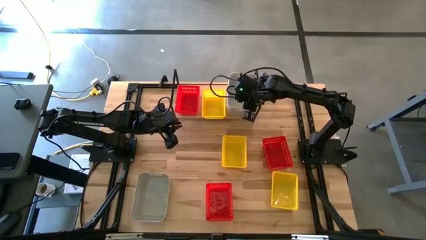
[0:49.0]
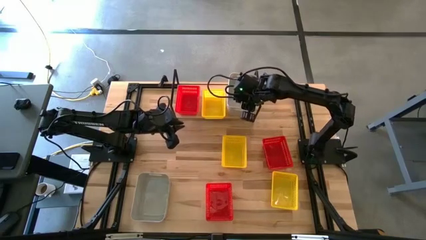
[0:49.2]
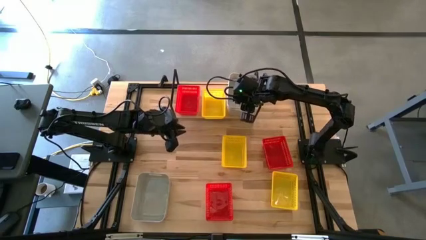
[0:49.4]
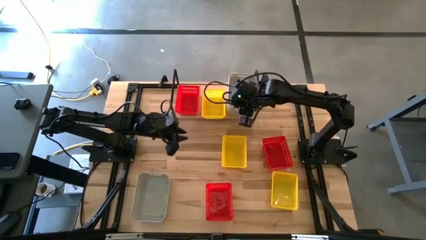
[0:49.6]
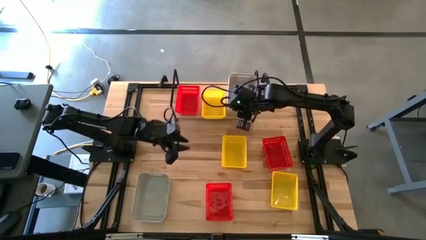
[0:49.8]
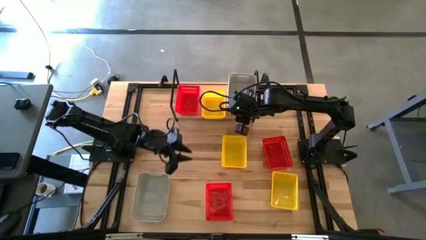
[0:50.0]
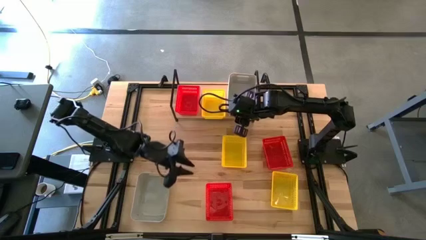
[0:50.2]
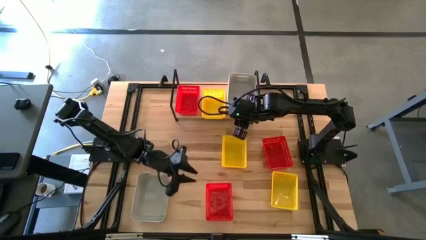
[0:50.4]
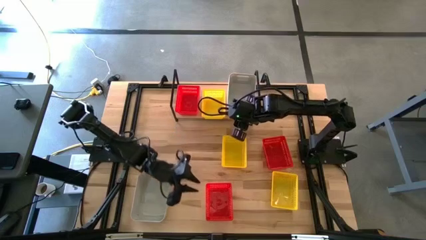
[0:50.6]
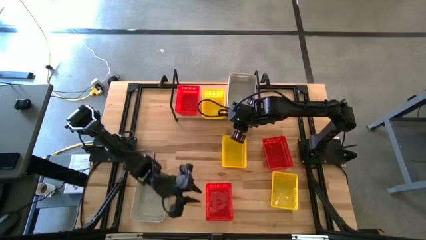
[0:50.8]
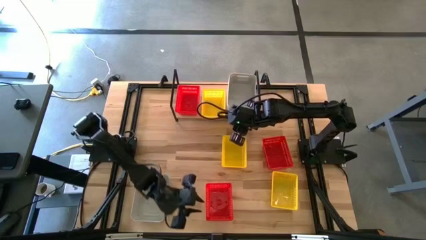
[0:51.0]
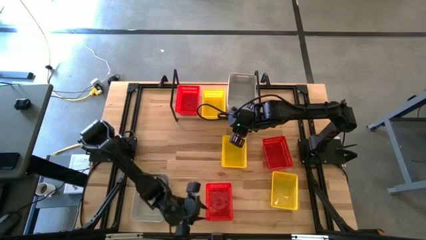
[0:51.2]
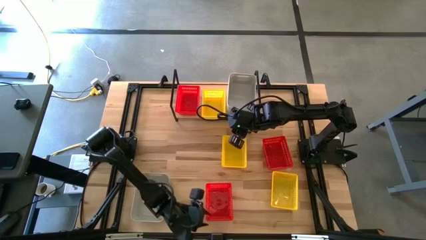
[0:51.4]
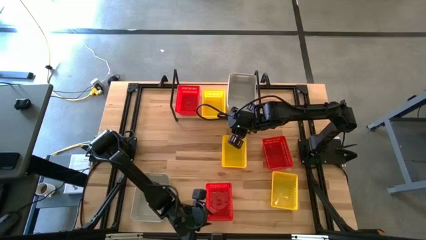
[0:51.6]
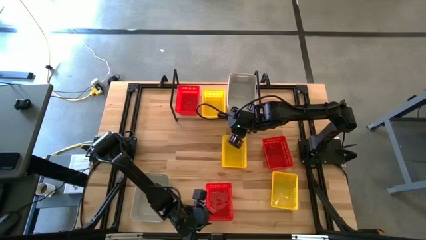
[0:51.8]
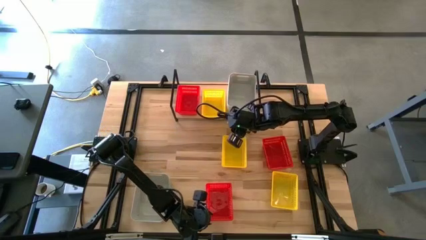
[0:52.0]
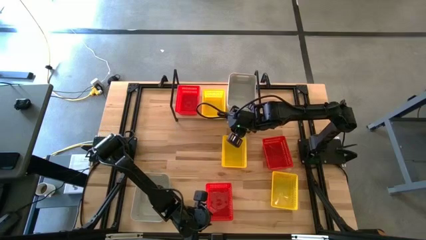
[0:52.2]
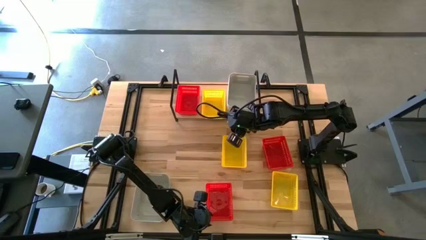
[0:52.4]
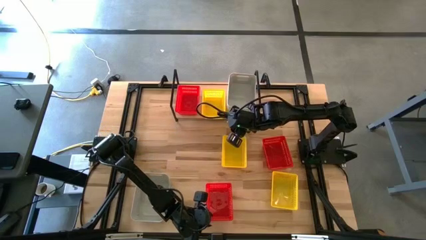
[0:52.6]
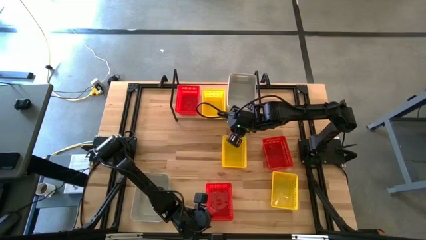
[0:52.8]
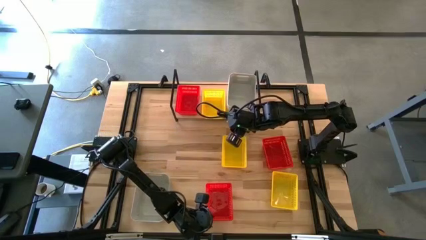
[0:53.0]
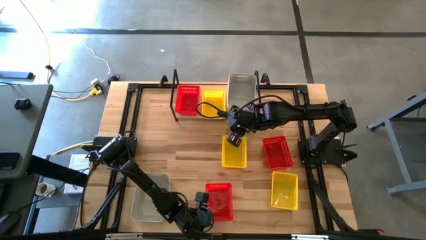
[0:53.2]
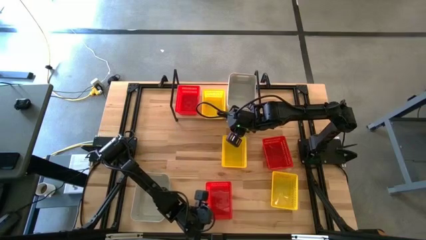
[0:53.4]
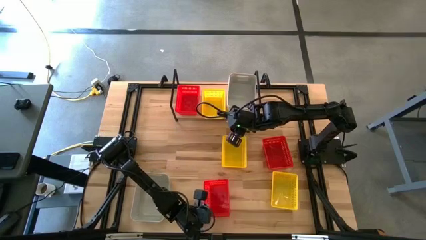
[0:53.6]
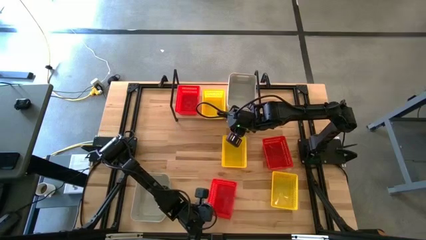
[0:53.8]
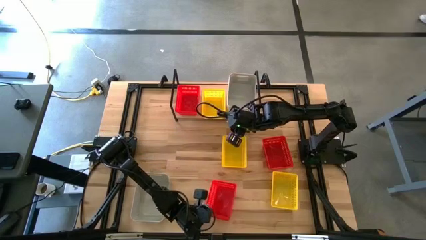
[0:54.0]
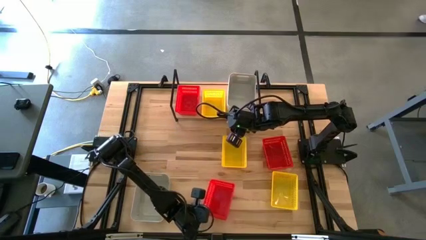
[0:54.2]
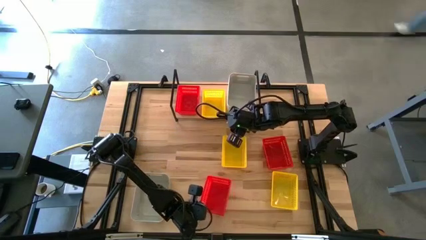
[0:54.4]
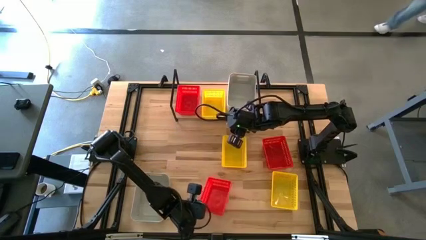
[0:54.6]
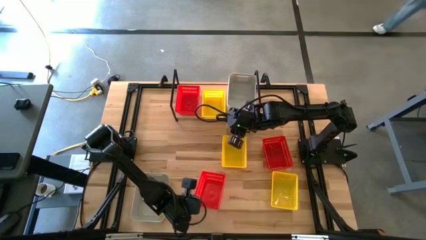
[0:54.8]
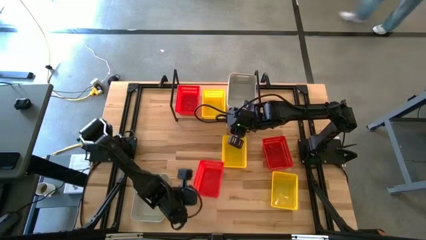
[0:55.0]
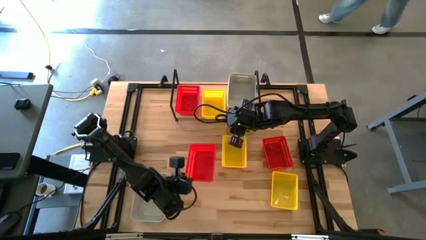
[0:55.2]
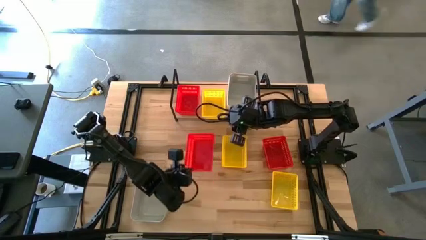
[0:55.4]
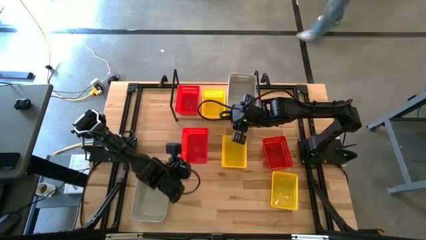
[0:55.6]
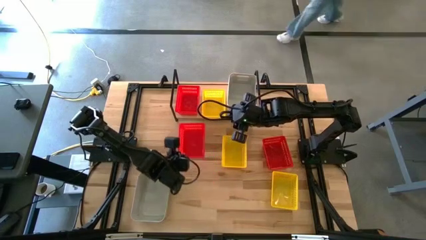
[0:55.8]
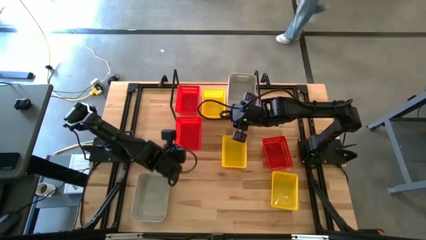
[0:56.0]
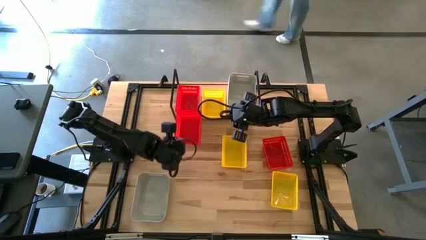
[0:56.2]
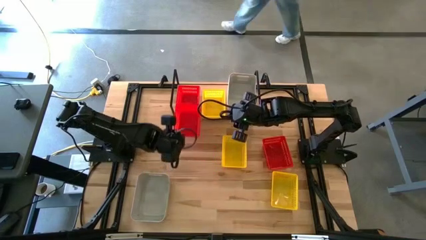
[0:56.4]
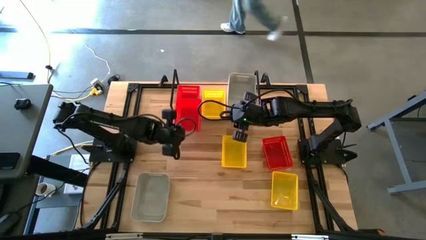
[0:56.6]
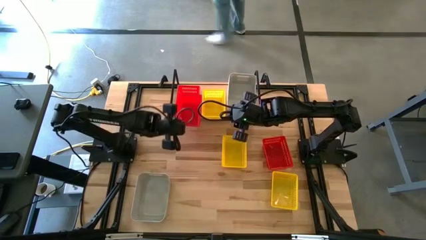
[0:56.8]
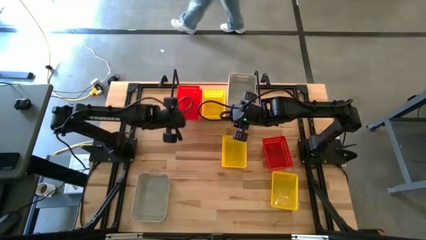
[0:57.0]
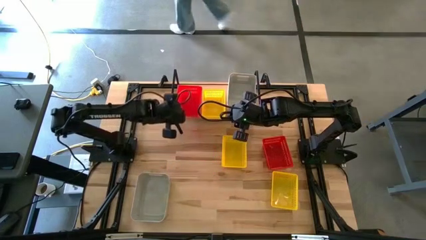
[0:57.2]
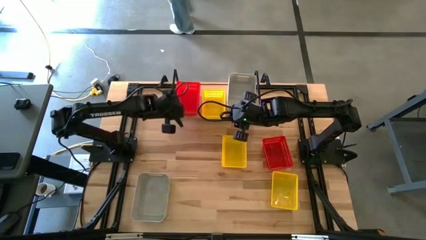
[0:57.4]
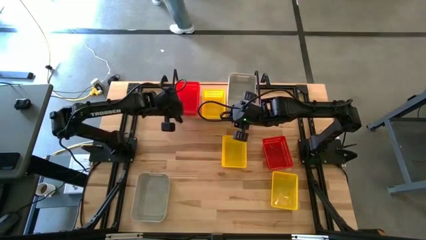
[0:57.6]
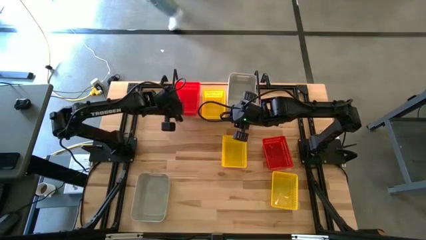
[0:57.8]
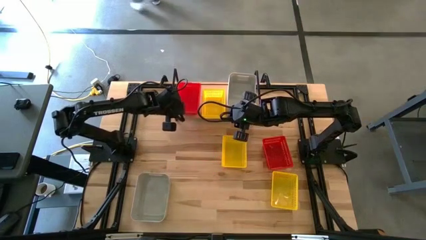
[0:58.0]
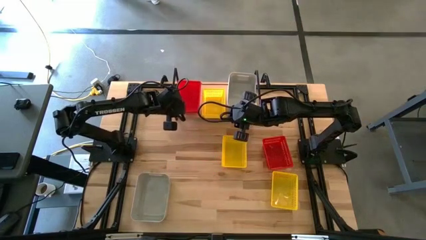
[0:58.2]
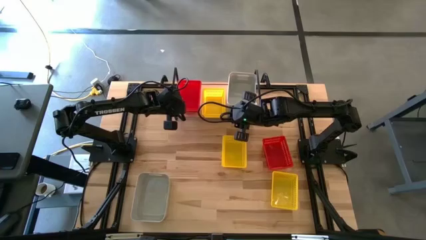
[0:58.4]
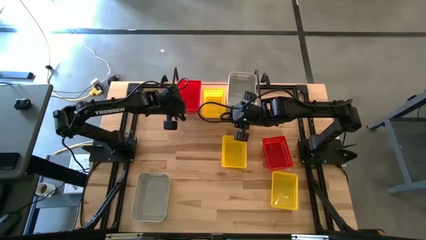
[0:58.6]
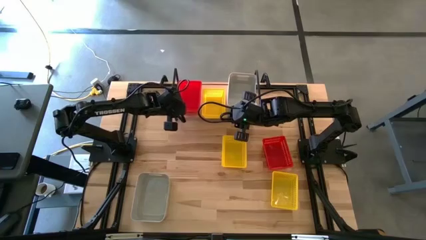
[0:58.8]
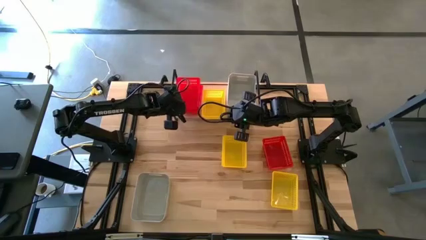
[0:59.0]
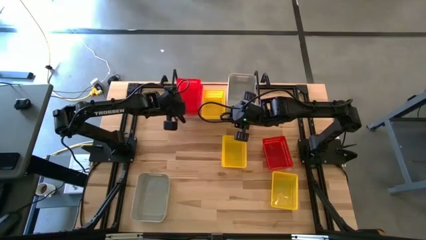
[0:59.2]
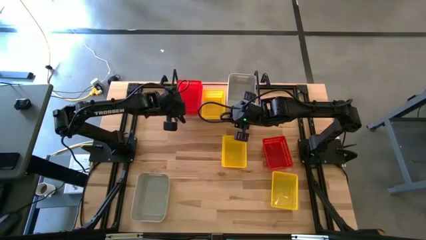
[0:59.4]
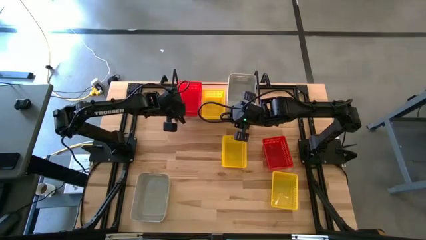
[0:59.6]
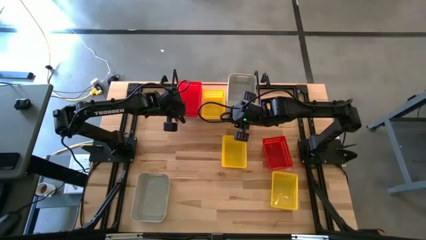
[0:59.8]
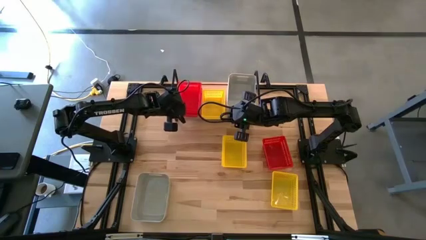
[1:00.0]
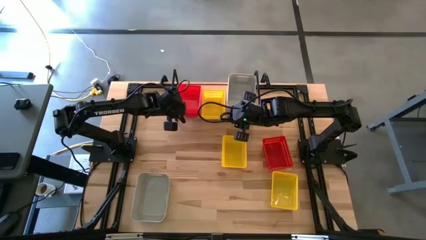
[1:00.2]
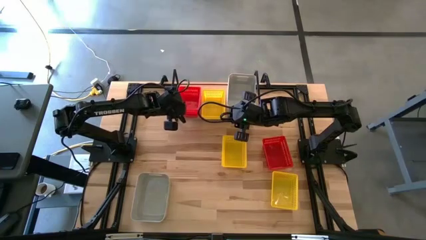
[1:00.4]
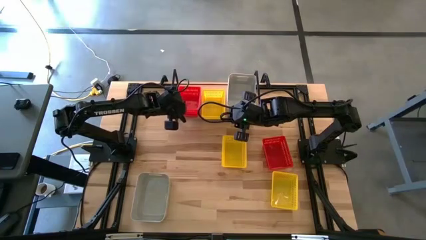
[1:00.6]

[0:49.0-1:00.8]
Task: Stack baskets on shelf by color
Stack the bottom red bin on the red bin on the shelf

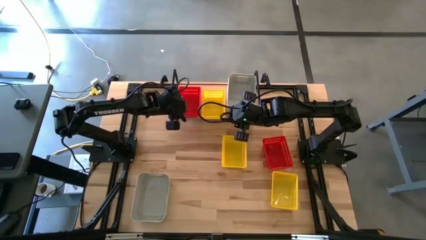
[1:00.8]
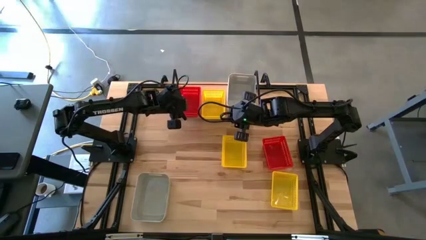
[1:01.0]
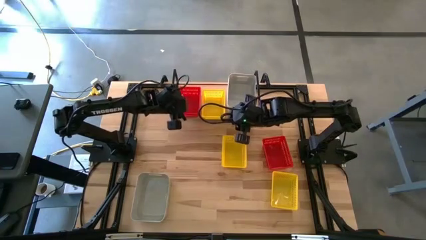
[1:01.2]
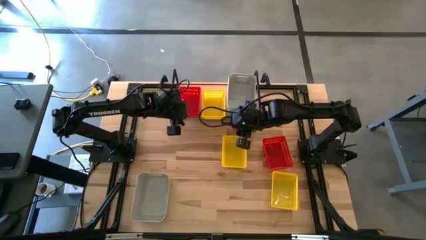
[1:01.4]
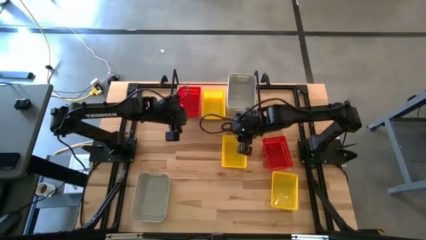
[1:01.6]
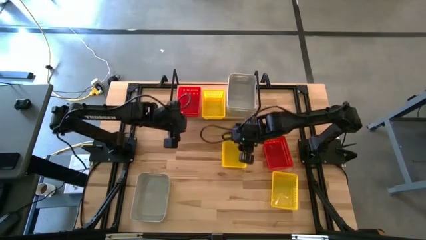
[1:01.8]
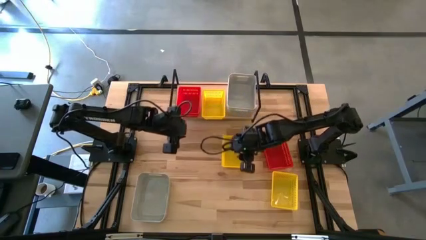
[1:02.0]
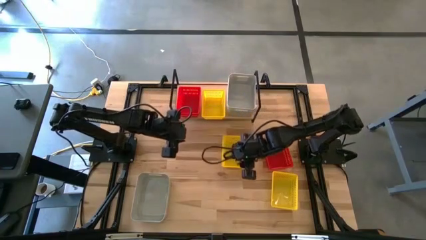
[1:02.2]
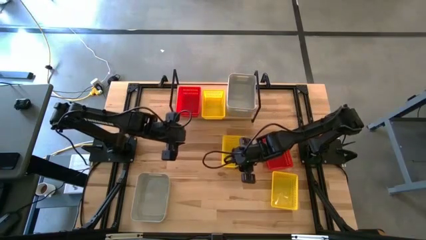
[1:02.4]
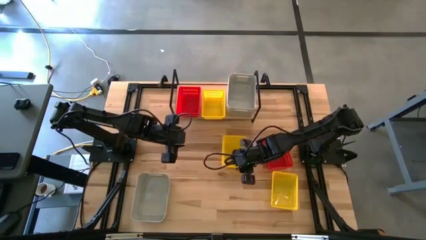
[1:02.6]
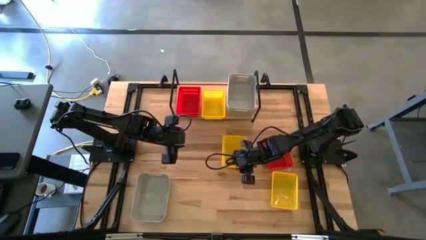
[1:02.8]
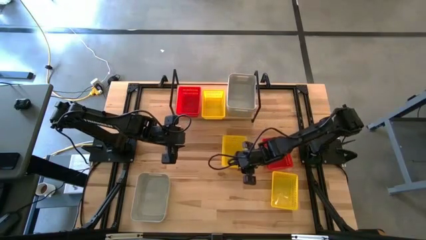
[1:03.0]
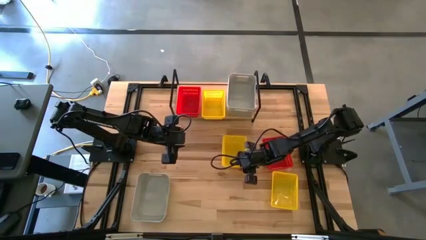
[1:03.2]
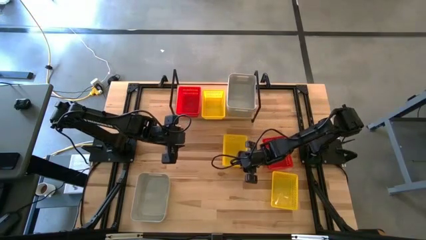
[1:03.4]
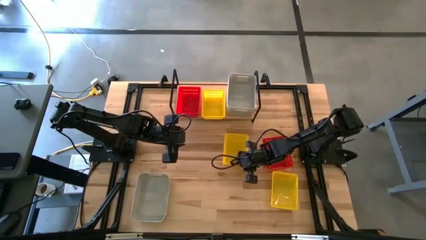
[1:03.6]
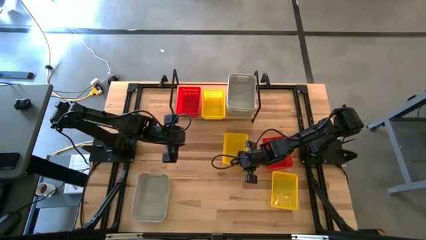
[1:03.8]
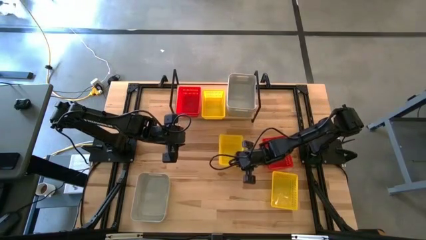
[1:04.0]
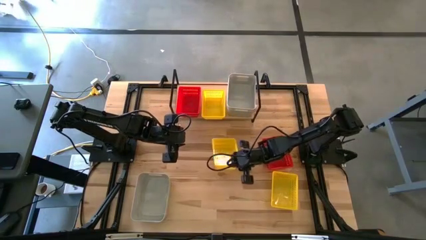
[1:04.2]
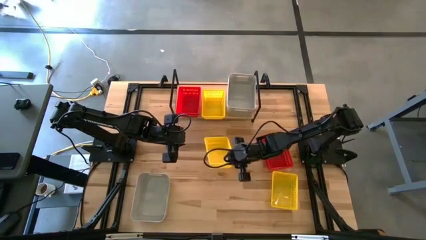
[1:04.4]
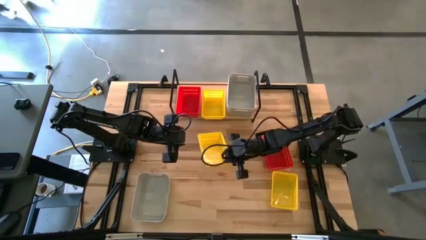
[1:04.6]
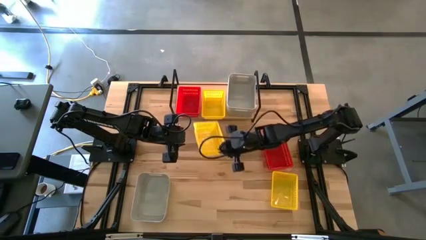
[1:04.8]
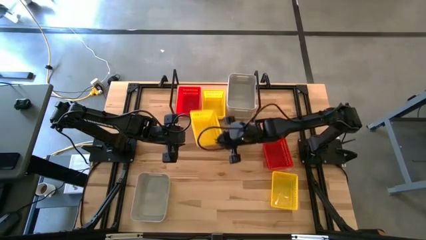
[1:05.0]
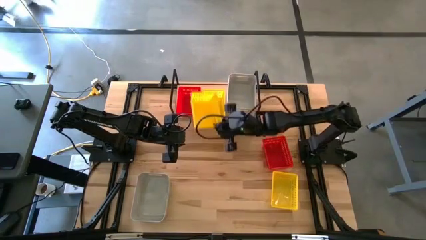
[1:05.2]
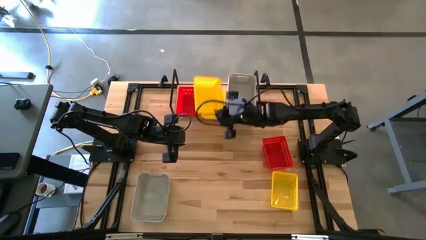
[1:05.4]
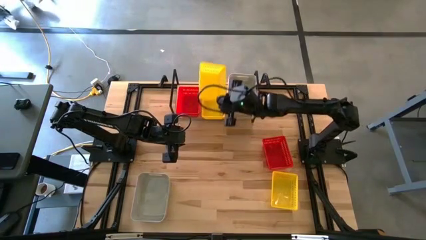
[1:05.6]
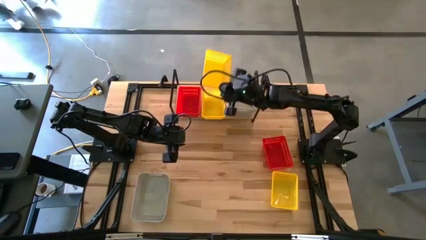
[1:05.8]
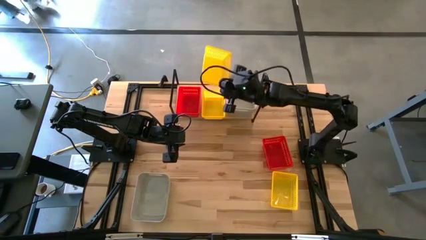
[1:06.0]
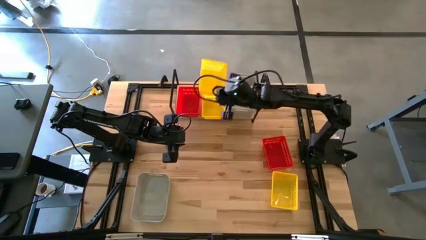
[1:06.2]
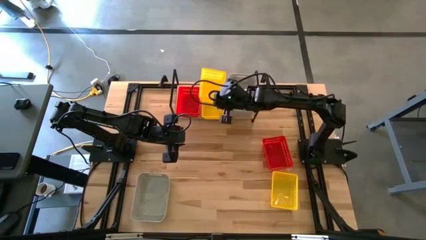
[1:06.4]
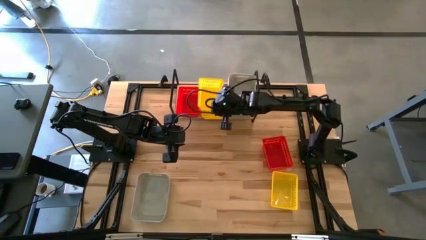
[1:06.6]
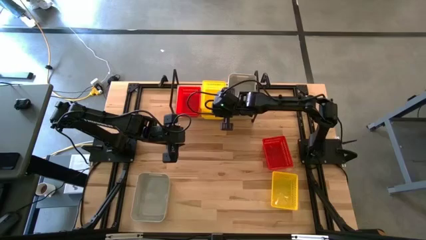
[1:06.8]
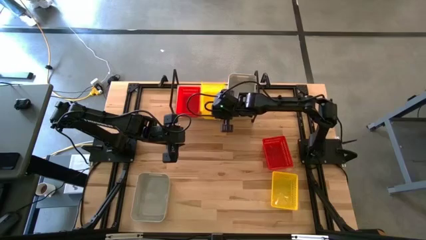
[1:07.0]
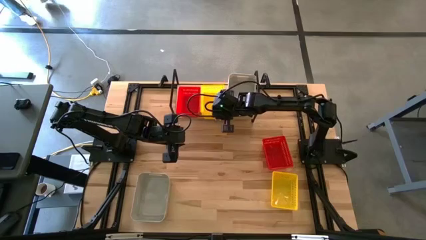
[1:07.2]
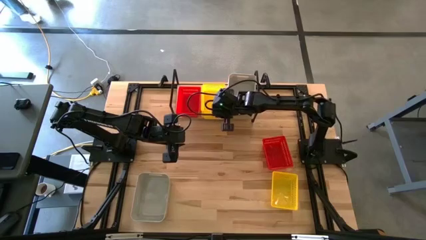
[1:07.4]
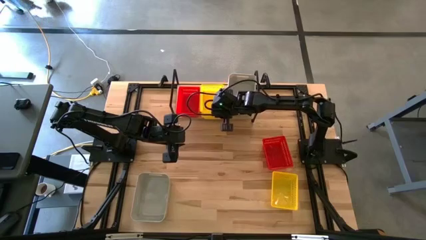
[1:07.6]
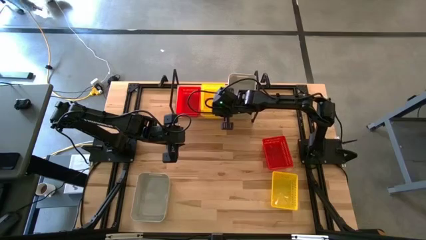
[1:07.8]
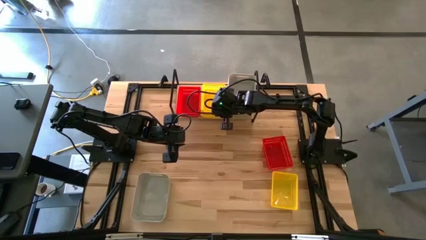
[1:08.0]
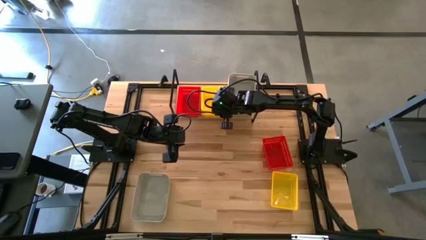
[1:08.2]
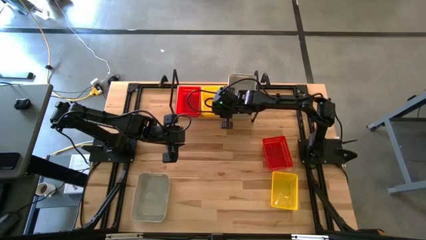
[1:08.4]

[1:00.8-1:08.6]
Stack the top yellow bin on the yellow bin on the shelf
